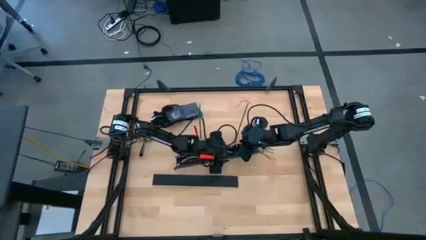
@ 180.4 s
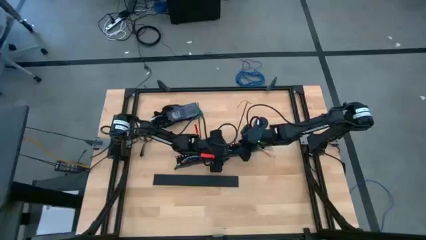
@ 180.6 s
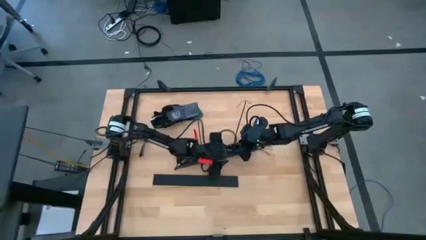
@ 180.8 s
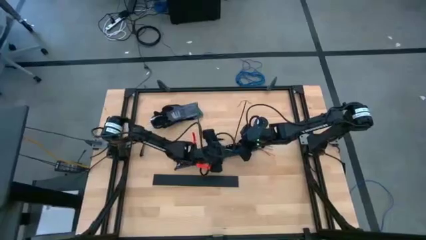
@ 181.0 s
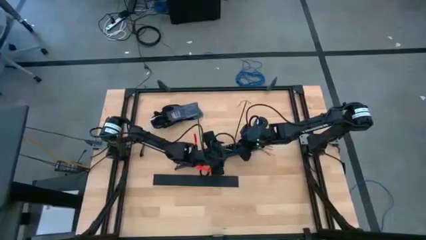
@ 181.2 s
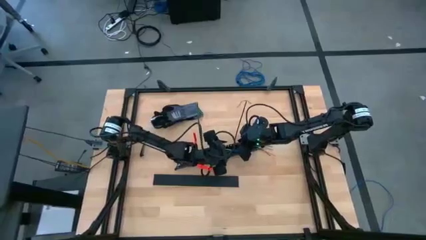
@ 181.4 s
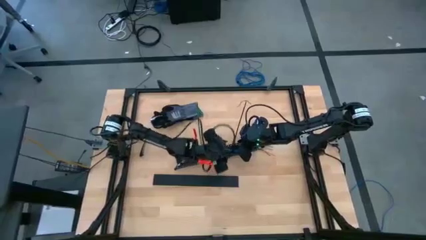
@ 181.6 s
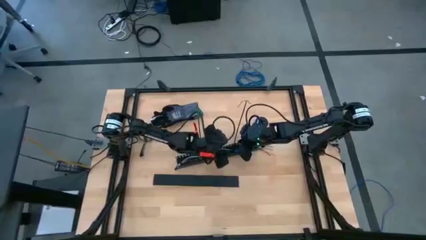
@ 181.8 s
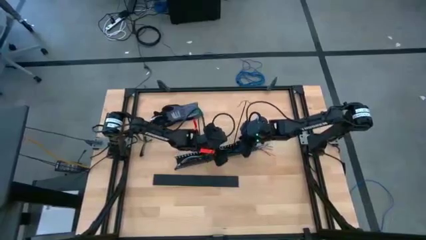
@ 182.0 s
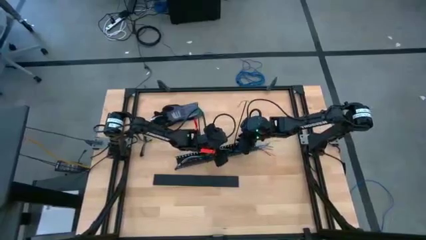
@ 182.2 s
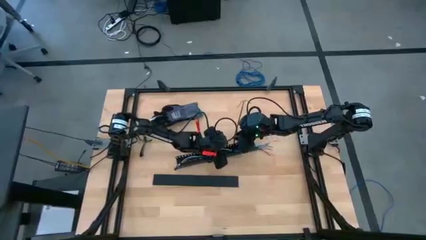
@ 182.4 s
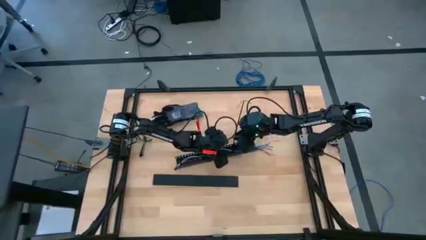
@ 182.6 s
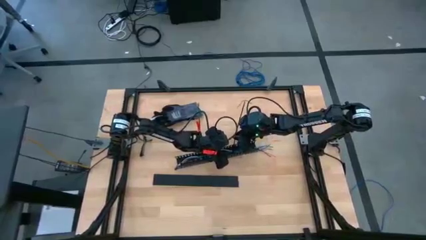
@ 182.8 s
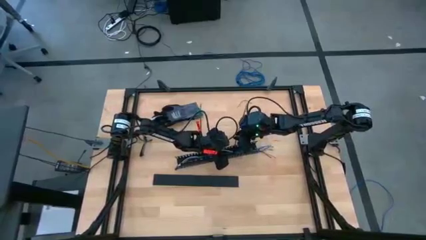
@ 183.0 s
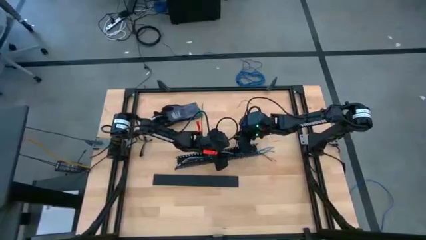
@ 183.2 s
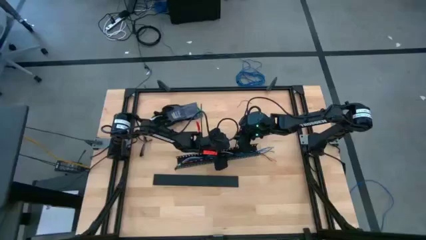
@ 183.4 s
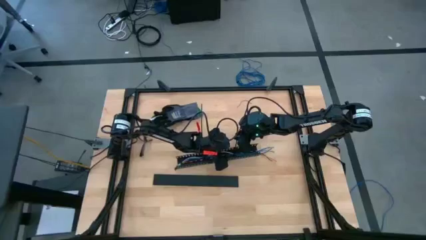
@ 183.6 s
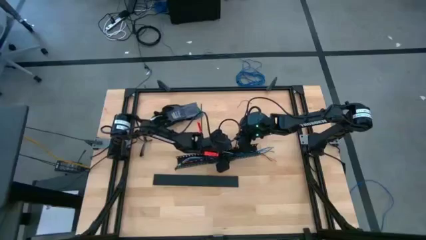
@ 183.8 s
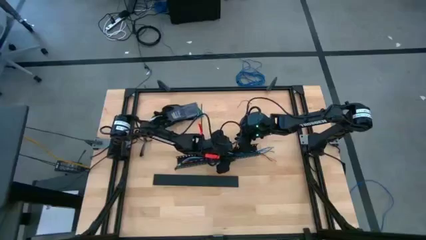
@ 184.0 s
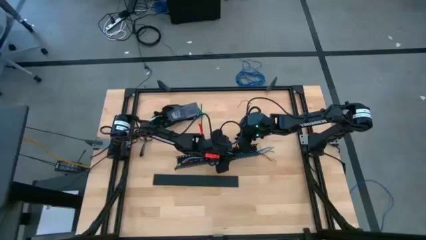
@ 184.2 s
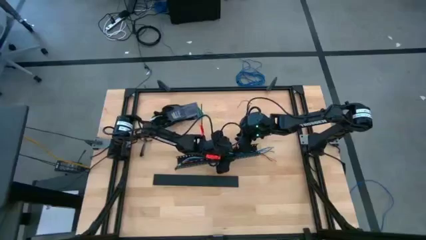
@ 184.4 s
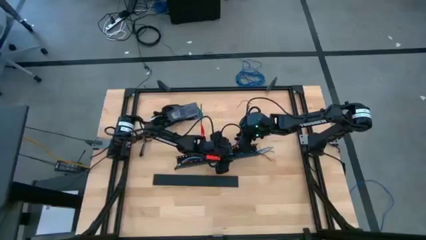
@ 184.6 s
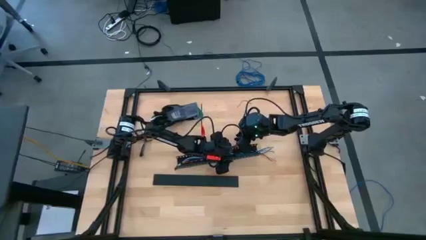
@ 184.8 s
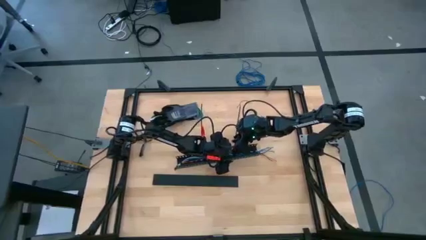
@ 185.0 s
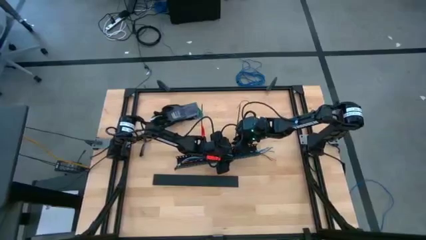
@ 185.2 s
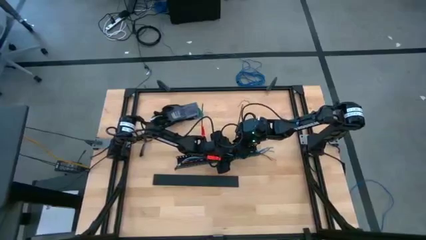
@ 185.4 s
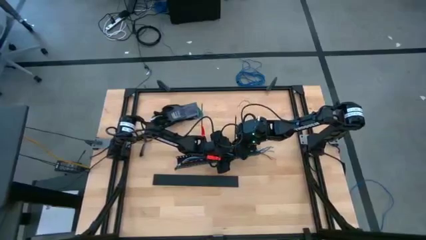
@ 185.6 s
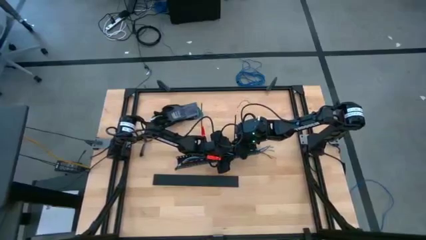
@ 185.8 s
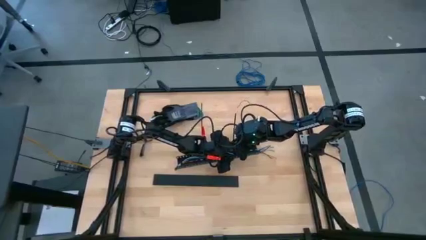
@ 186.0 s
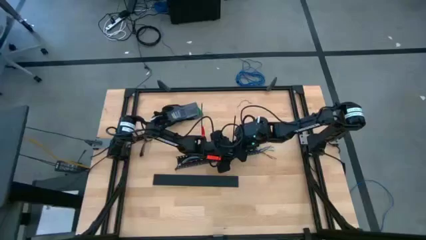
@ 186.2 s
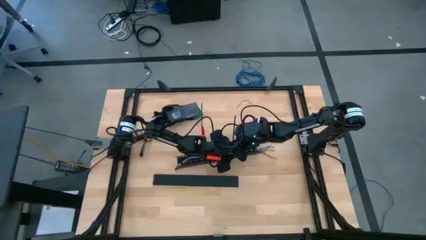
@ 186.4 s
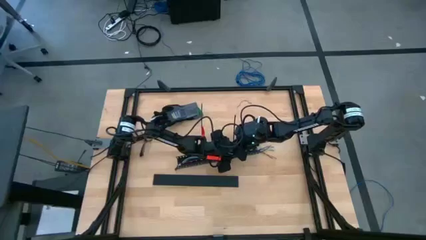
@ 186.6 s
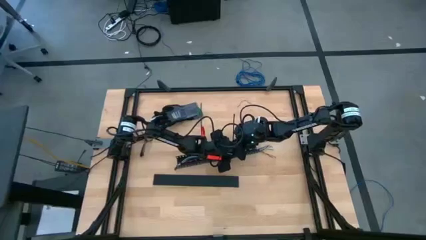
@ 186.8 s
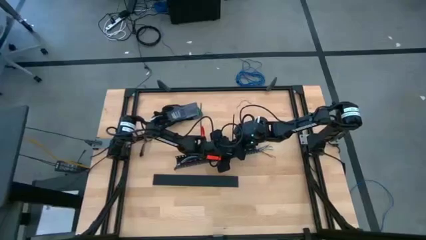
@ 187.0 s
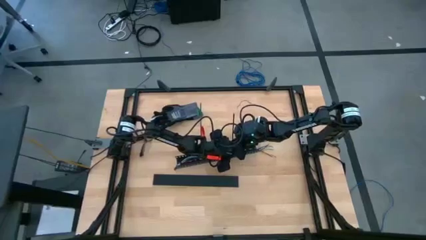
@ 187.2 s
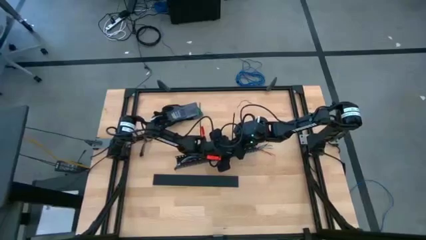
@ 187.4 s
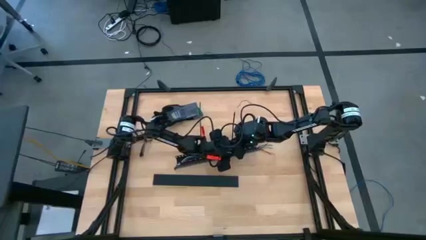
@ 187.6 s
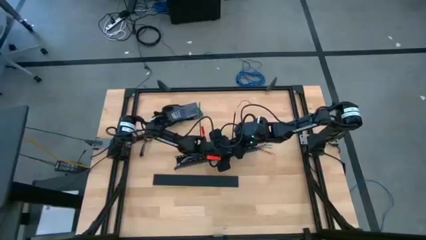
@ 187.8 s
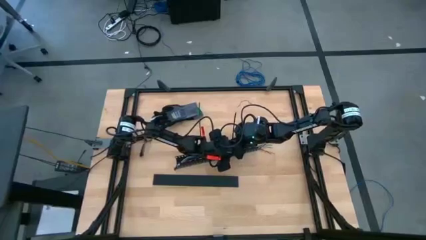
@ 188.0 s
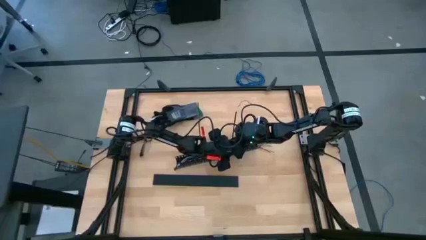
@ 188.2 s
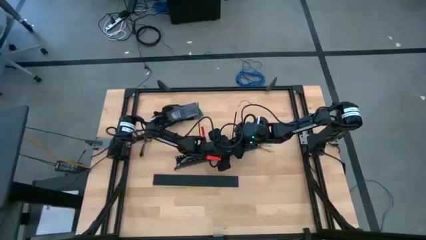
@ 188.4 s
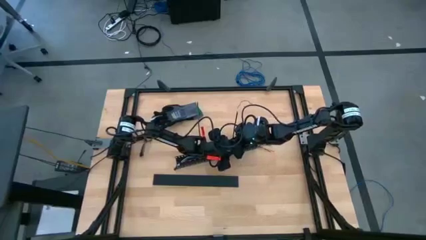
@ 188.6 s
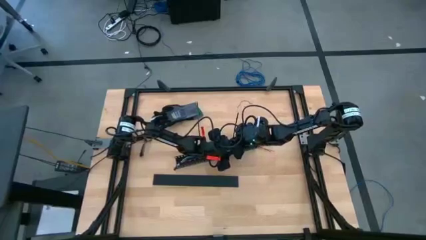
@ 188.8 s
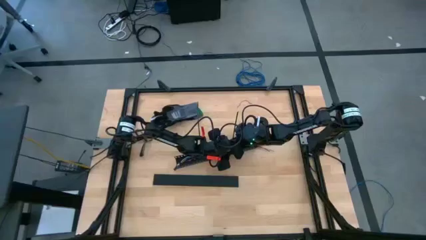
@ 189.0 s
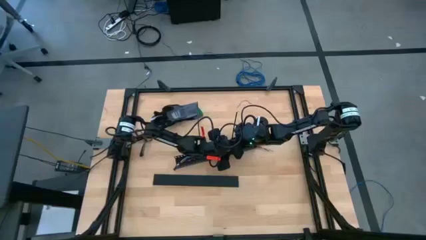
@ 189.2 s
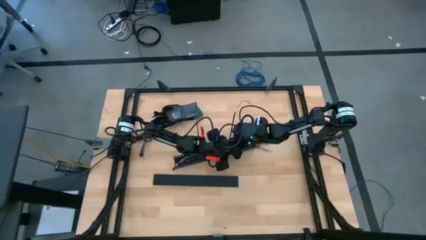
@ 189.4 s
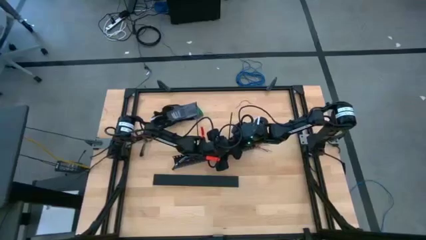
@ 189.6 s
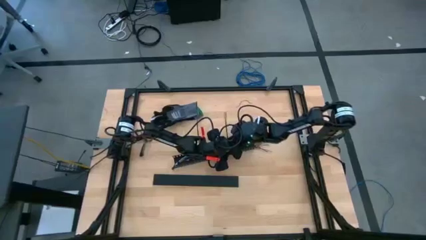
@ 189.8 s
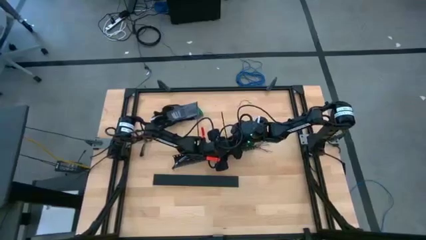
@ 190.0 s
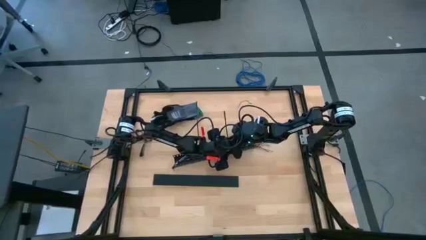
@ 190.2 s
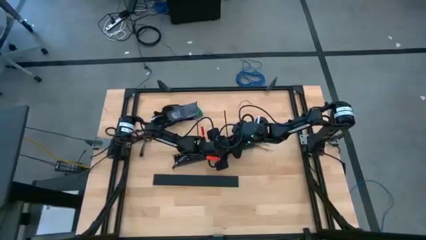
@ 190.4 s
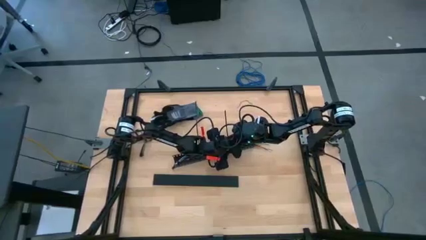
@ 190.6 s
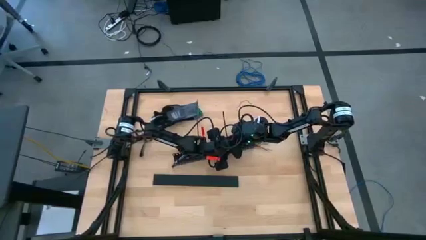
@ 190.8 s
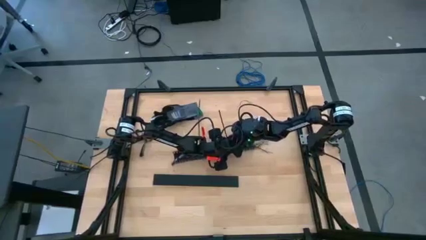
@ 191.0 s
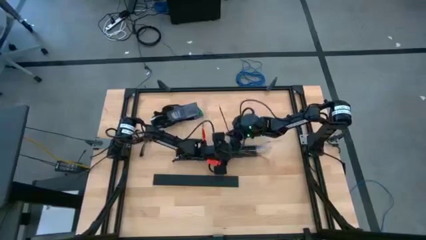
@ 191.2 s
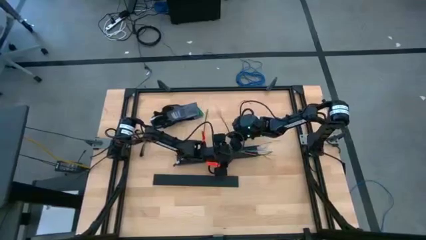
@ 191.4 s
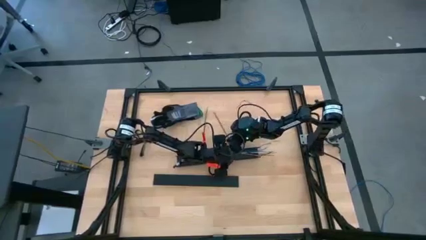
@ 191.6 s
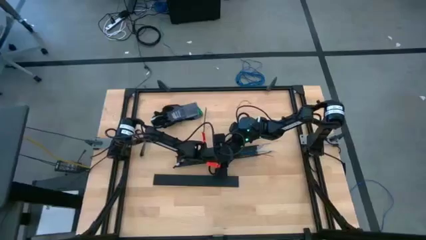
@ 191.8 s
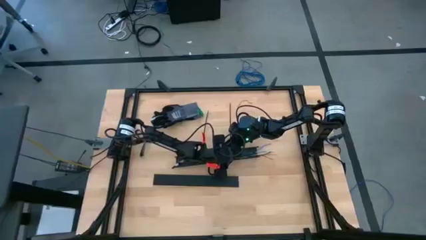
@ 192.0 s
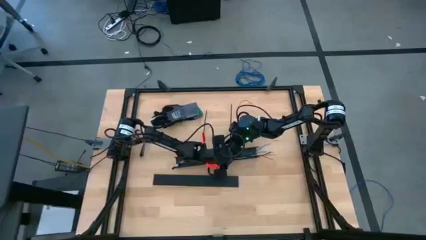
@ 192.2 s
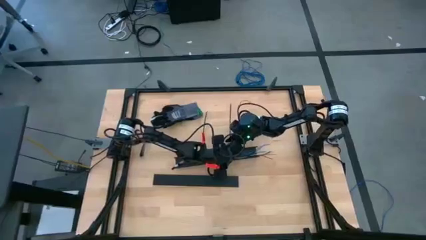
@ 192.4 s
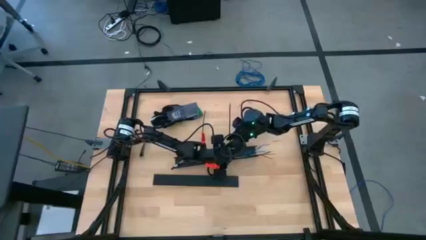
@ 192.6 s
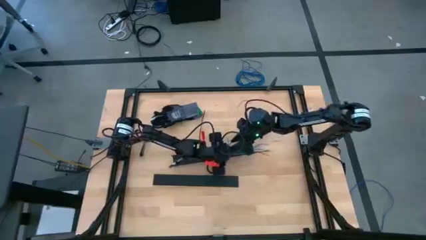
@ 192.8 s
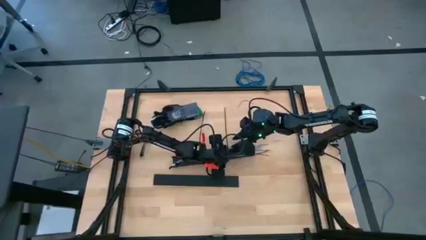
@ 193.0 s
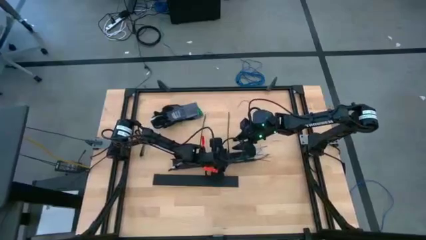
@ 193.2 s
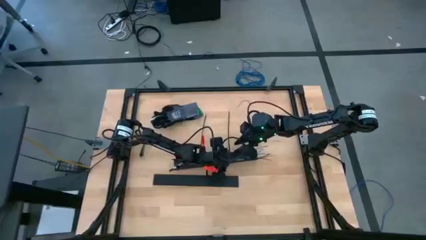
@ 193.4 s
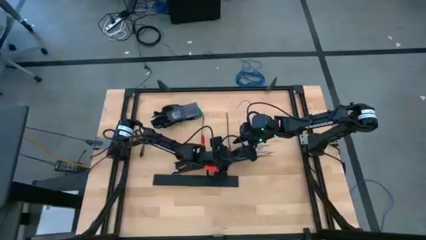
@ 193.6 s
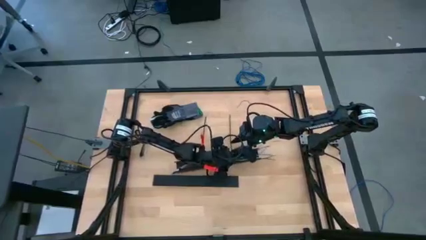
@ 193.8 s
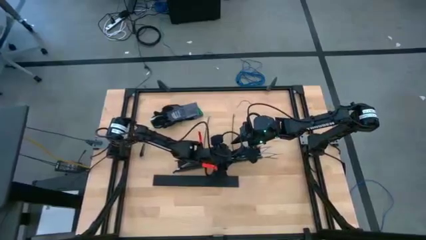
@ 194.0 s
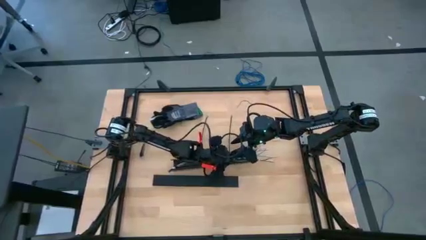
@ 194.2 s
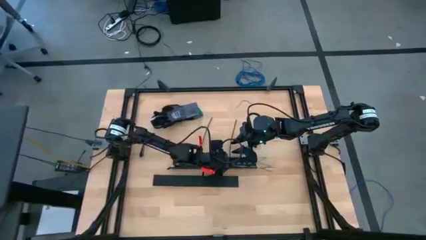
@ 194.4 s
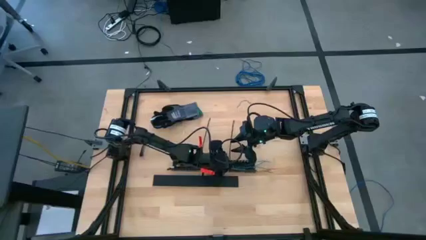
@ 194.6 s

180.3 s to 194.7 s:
Task: Ziptie cables
Put the zip tied cables into the black cable duct

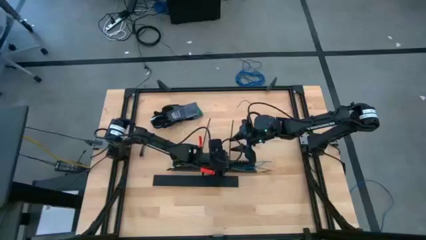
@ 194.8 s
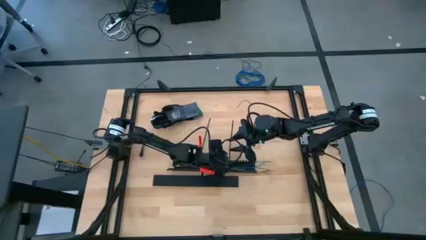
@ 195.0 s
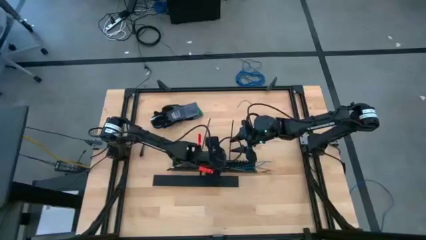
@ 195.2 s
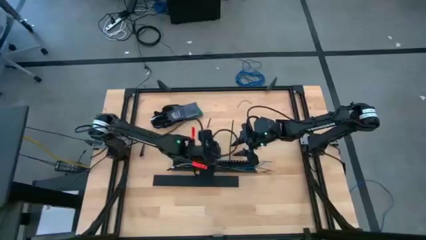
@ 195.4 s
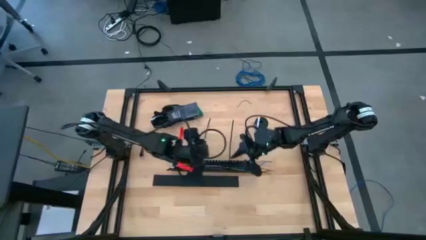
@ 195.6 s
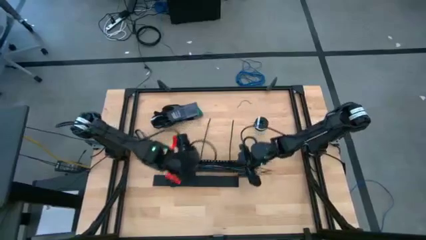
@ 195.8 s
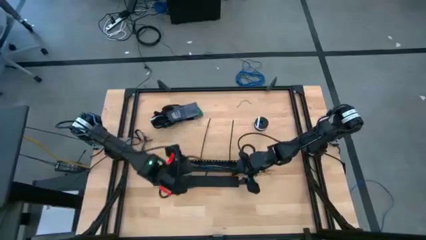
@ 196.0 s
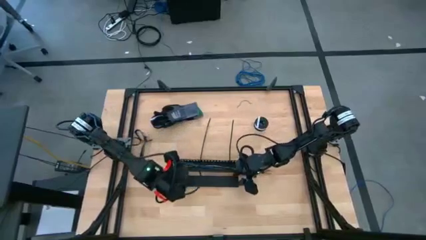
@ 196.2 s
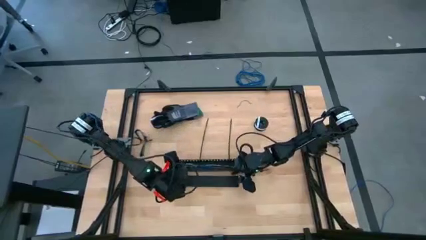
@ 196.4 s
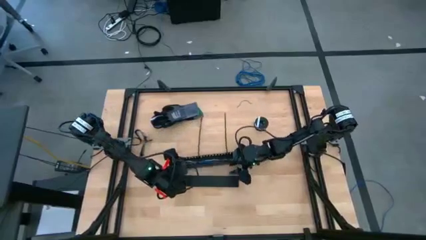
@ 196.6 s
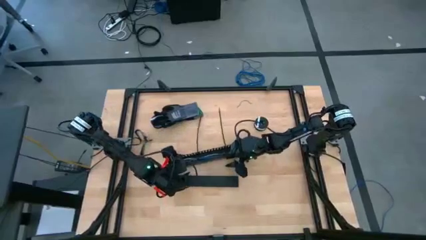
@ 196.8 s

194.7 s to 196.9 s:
Move the black cable duct to the center
